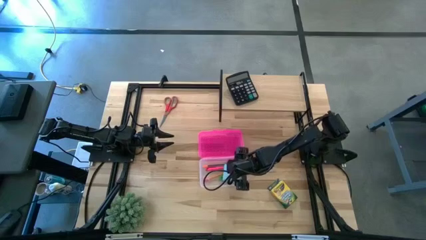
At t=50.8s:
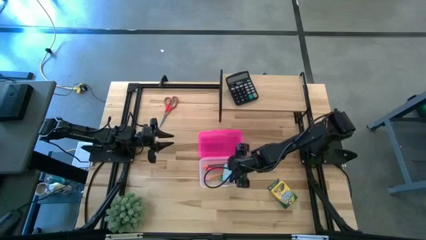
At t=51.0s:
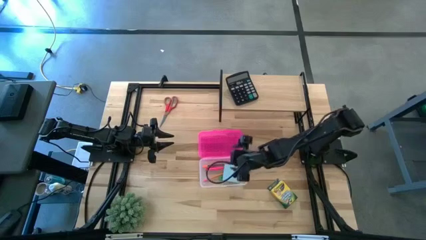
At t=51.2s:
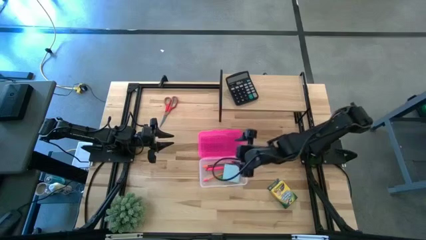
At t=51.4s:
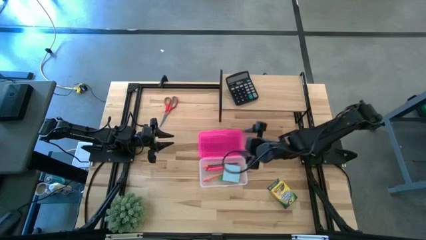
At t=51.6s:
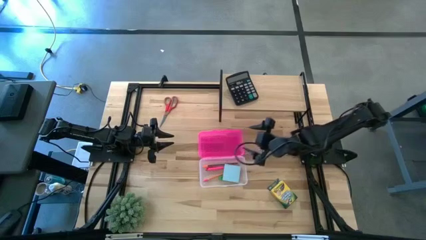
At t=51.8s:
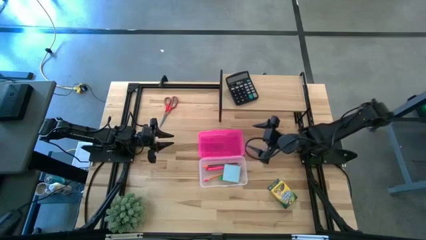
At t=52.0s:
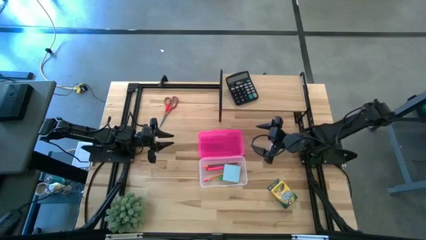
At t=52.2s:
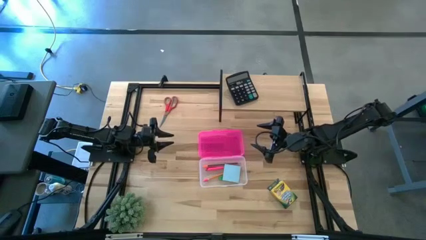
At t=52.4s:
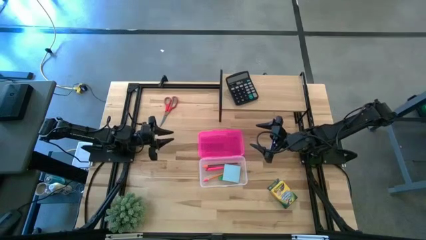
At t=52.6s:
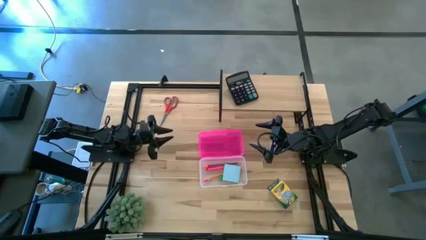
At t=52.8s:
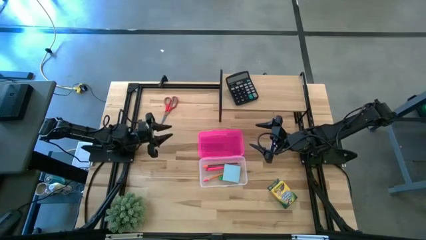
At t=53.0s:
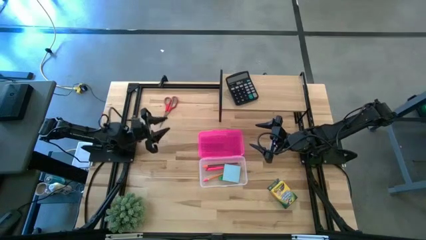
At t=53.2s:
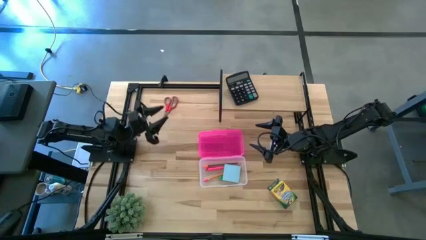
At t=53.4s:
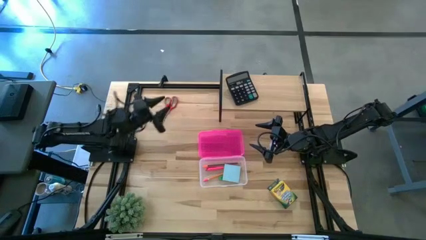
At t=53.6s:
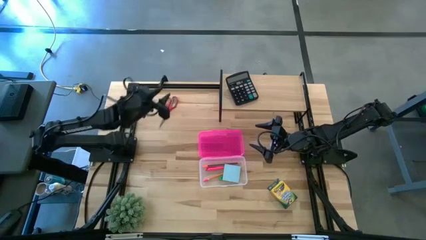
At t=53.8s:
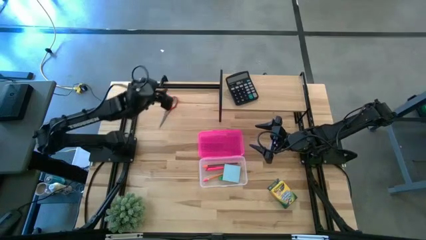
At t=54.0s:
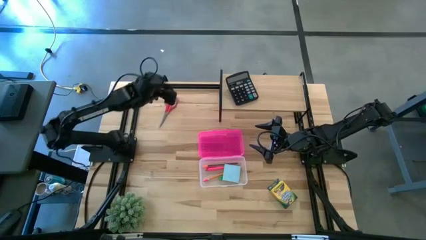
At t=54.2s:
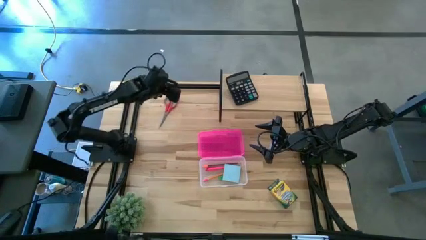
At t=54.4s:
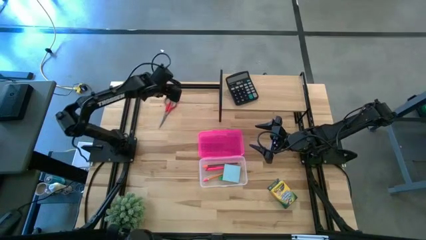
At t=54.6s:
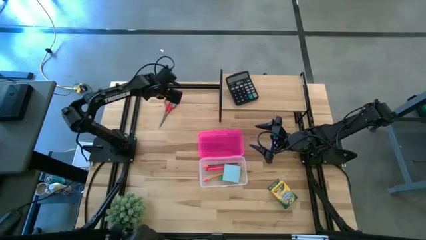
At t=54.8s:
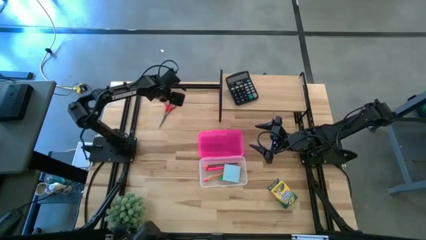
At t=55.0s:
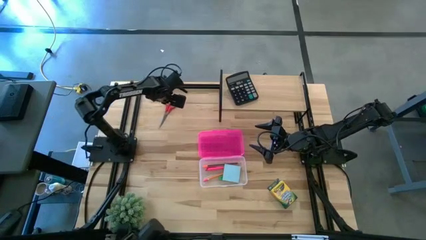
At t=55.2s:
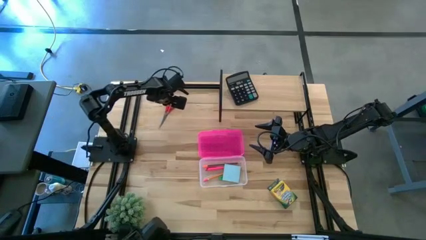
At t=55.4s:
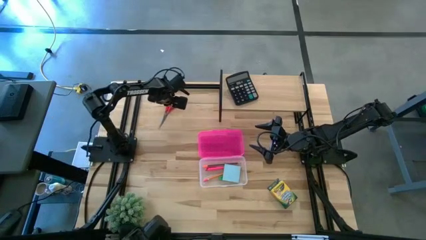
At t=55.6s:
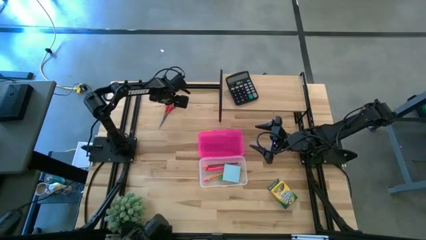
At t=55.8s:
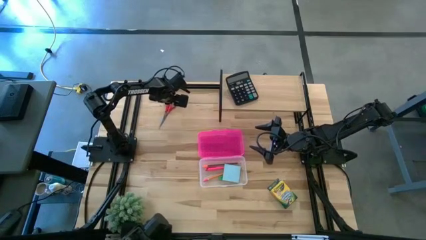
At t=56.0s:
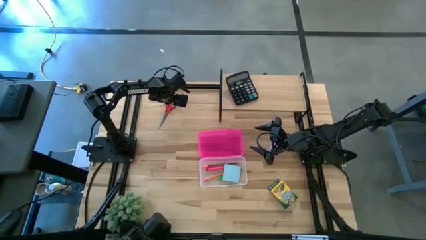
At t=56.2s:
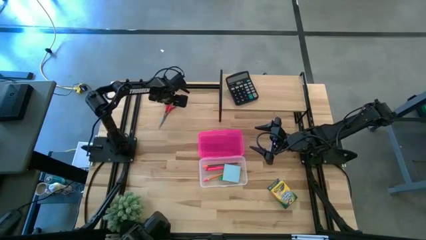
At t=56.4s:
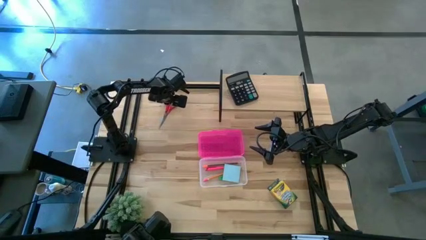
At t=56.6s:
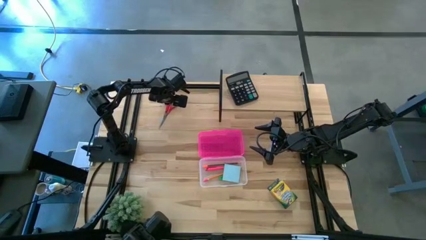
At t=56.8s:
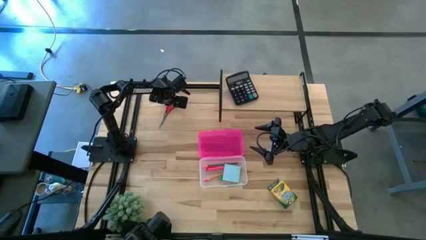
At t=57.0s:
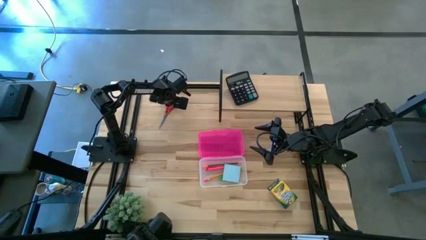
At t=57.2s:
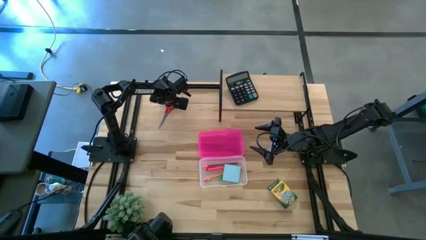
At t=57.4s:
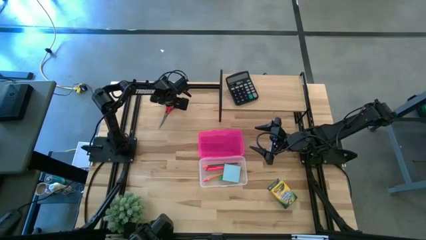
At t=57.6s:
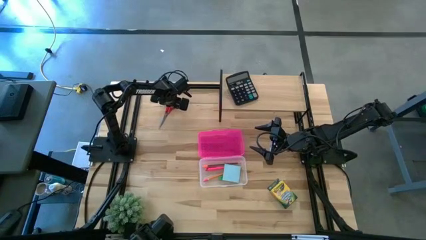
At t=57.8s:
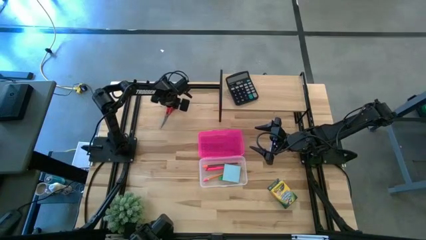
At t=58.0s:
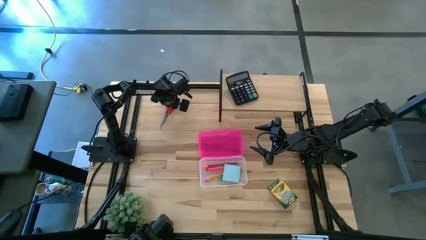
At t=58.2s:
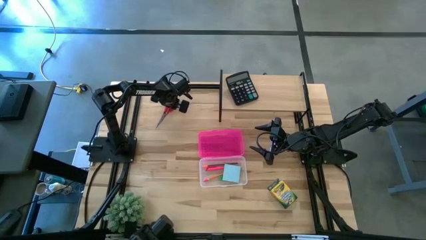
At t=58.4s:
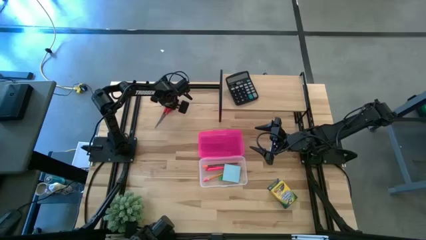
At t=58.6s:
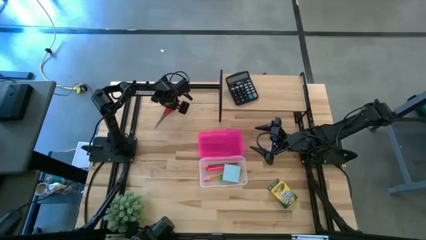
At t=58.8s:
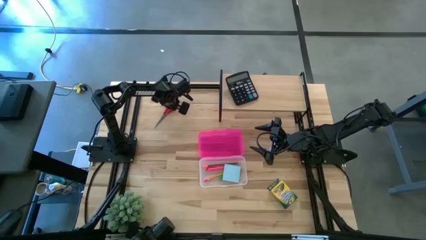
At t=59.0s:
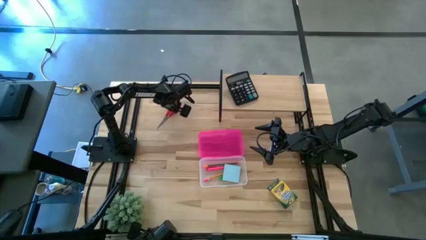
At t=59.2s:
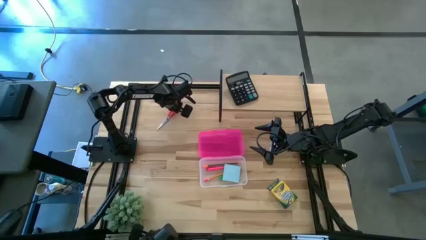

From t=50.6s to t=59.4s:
Task: Pack school essentials
Put the red scissors into the transparent box

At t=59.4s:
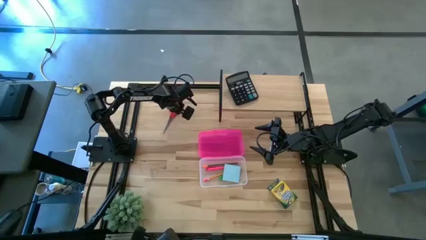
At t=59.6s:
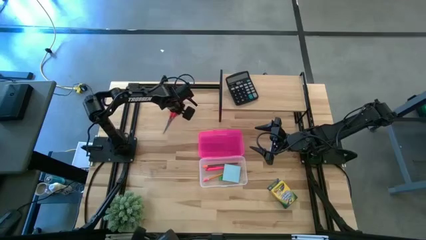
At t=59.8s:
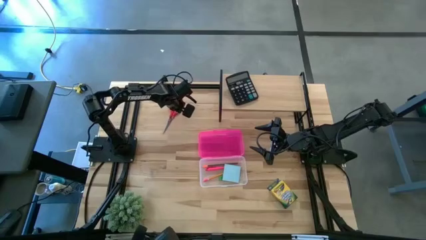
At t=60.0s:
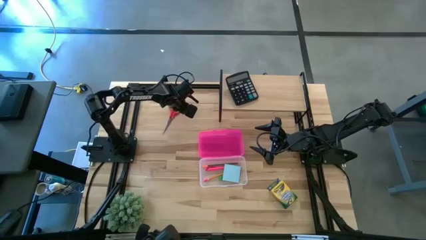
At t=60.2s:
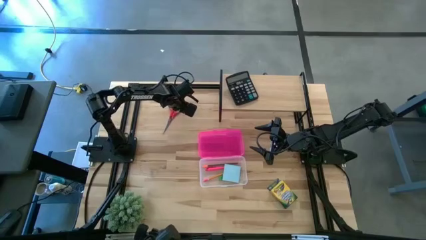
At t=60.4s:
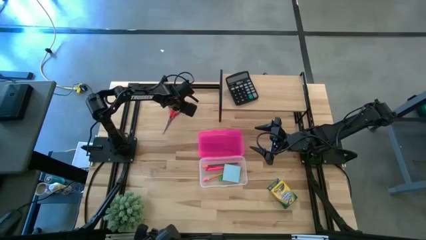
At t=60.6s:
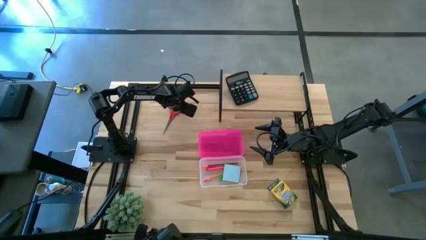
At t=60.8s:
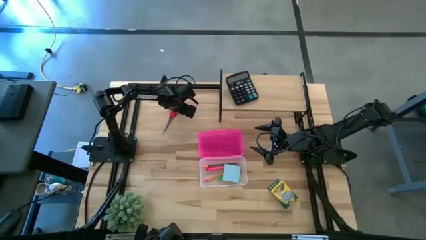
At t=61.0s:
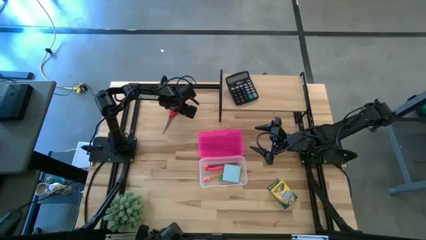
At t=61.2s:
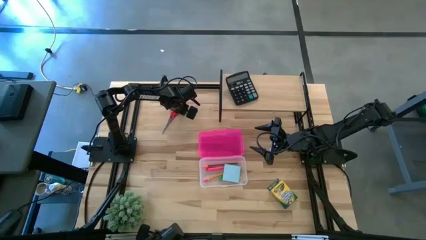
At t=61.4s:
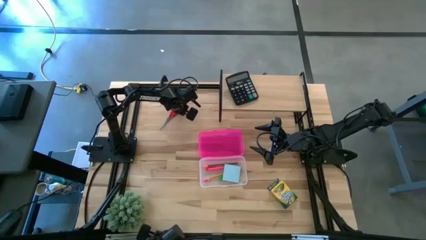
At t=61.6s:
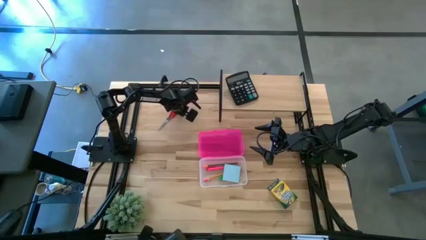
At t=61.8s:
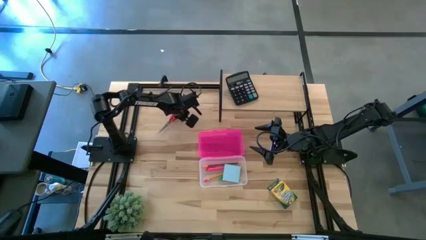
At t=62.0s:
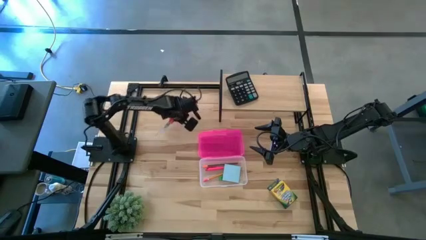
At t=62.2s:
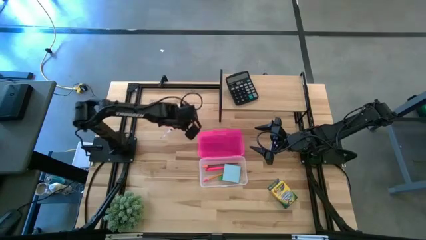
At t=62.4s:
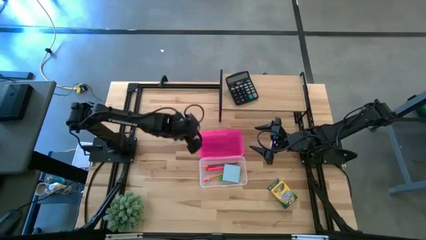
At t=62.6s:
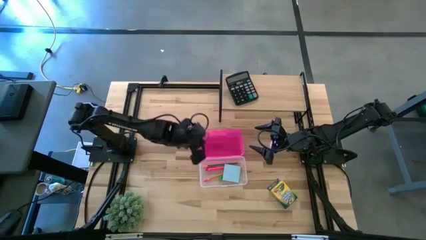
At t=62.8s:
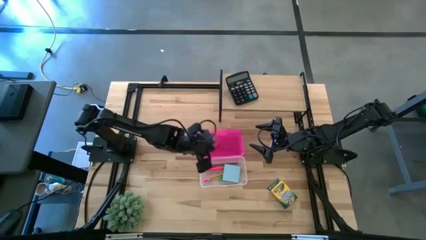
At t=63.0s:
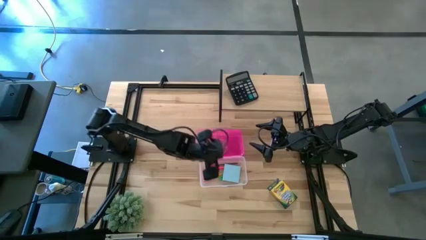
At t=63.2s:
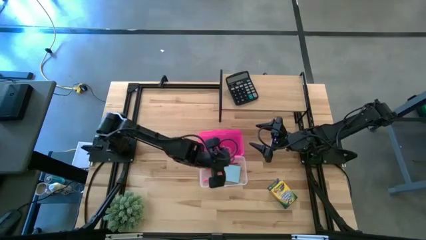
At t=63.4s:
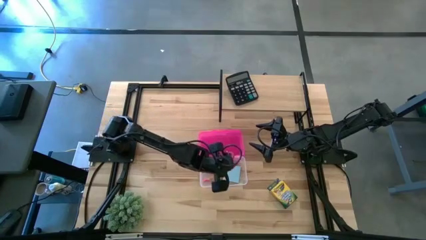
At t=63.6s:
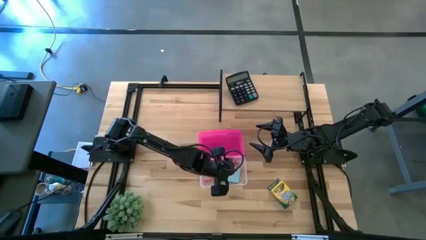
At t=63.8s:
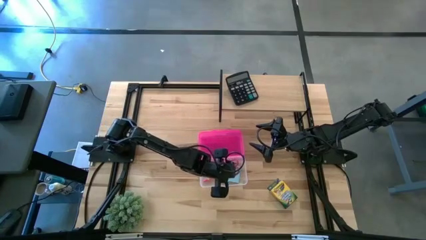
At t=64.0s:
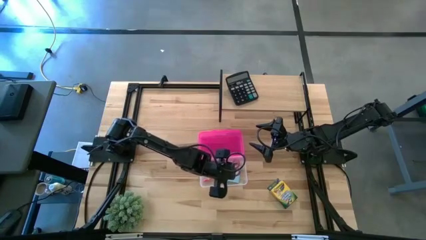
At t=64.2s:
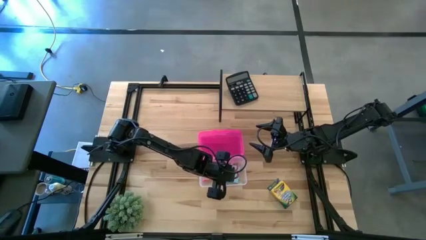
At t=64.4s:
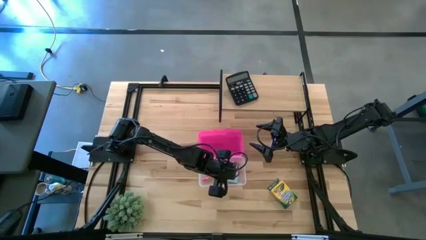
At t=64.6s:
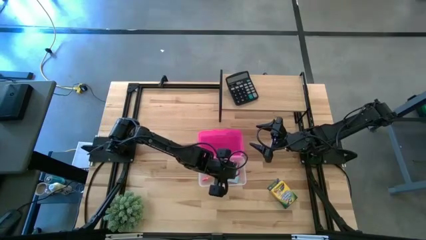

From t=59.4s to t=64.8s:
Put the red scissors into the transparent box

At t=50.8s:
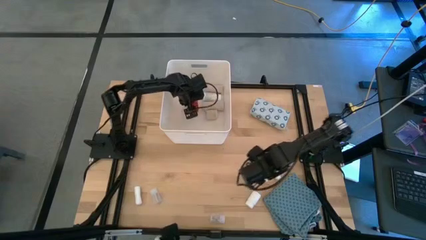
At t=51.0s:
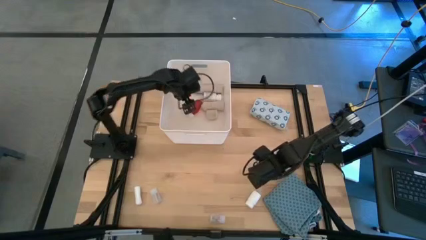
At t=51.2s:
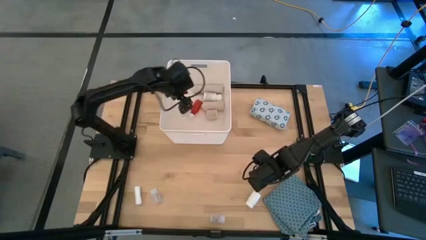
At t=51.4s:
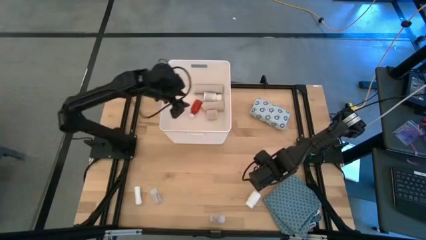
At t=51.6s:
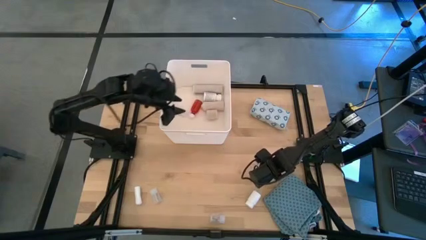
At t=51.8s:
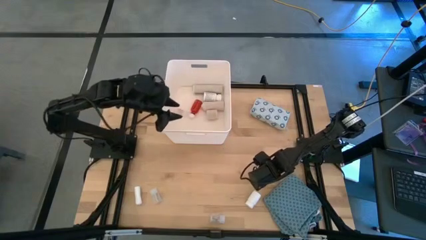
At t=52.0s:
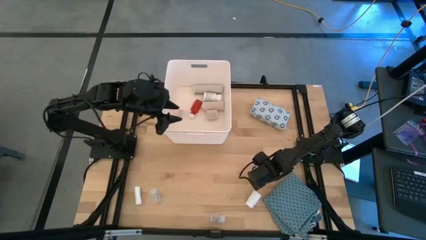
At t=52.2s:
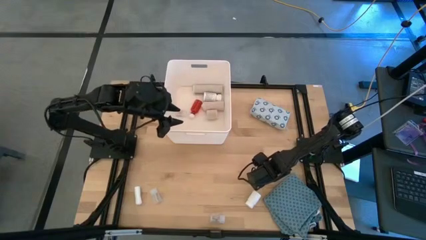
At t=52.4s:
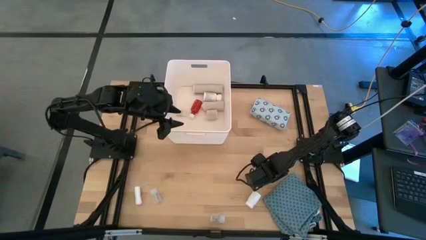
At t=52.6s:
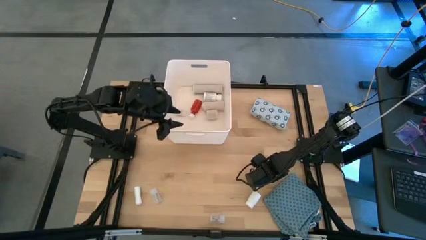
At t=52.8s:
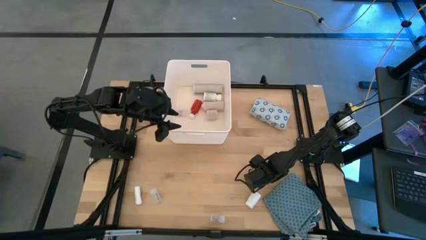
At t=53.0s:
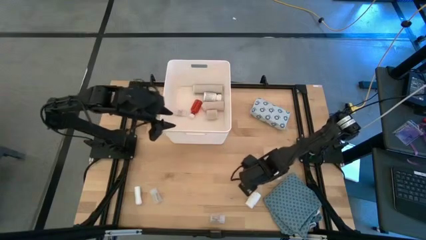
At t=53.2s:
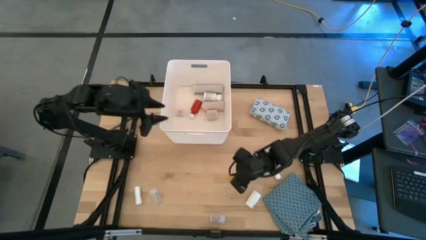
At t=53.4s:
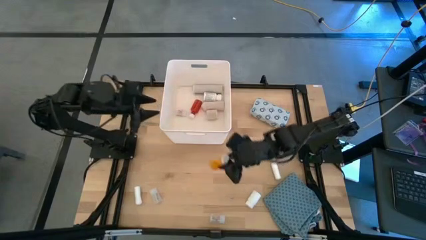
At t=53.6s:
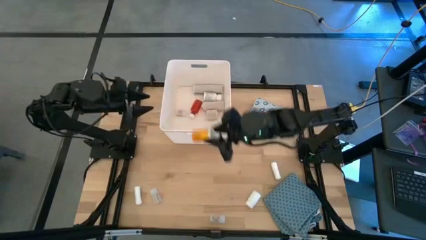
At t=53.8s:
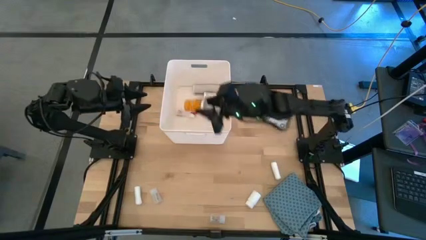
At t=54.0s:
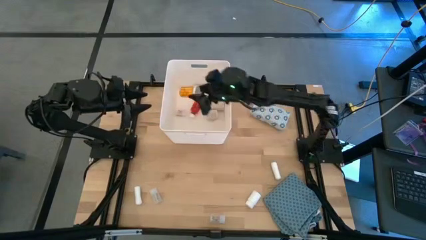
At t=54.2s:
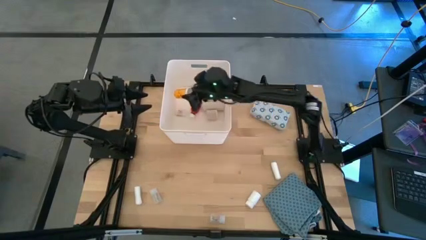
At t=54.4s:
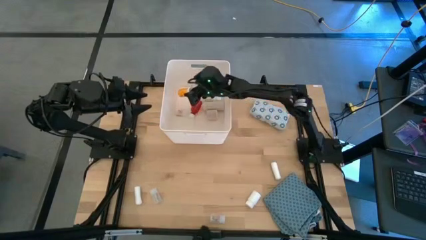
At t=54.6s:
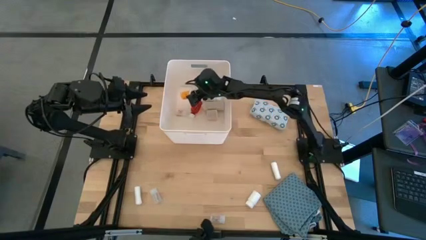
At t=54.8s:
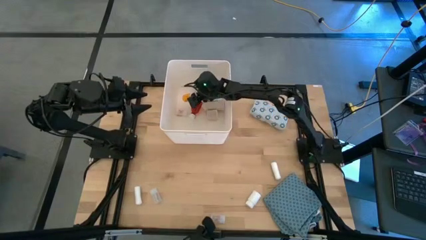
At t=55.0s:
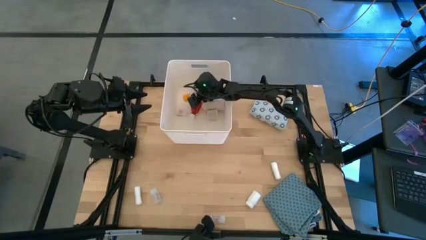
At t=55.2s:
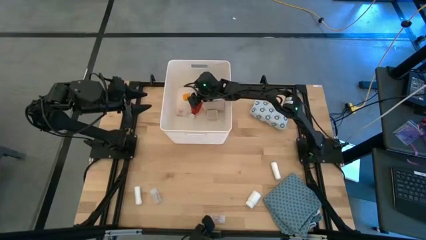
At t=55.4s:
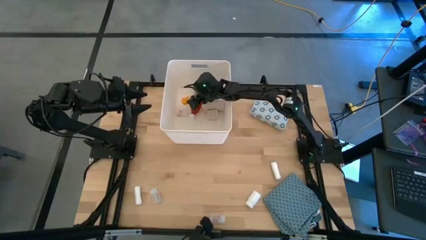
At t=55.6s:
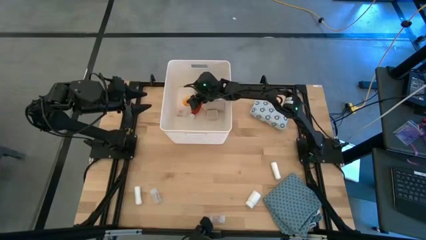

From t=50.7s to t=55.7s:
Task: Pick & place medical supplies in basket/bin
Put the orange pill bottle into the white bin
